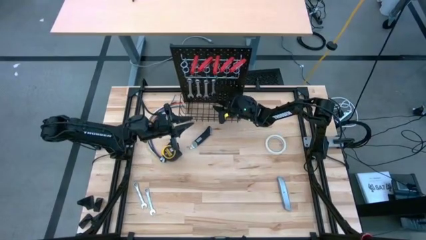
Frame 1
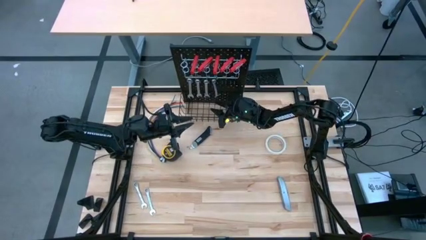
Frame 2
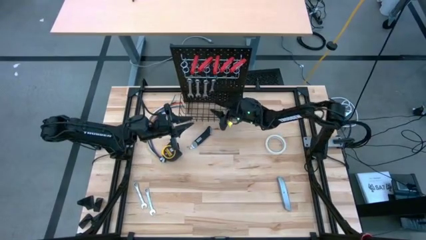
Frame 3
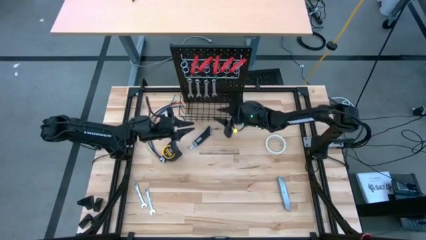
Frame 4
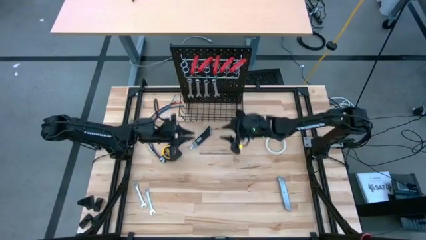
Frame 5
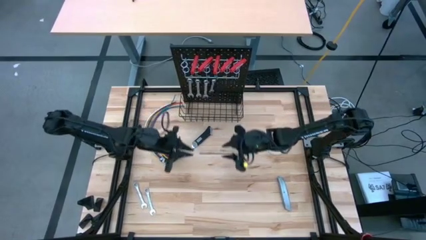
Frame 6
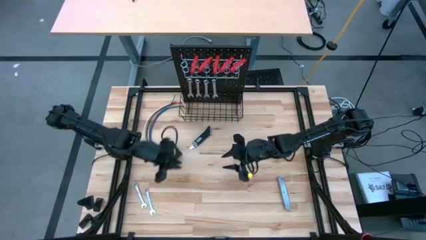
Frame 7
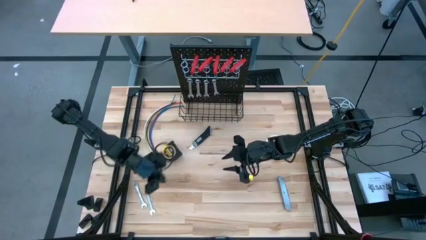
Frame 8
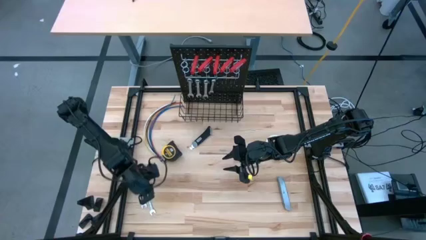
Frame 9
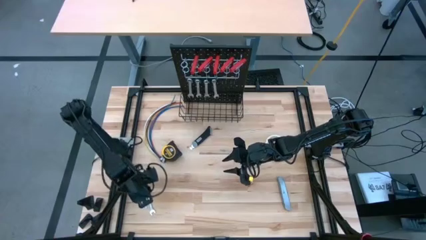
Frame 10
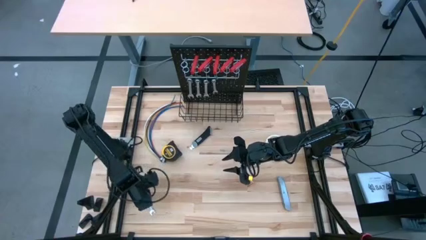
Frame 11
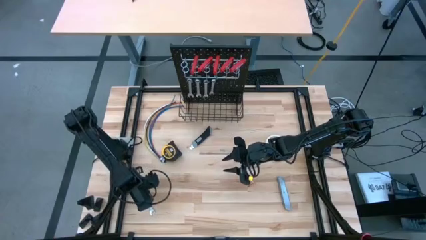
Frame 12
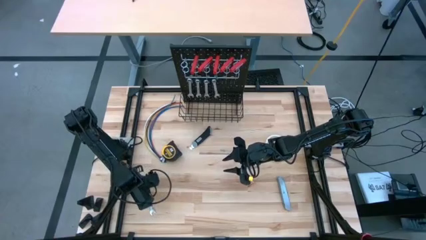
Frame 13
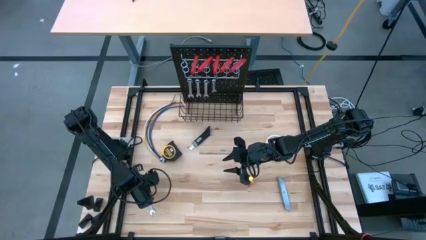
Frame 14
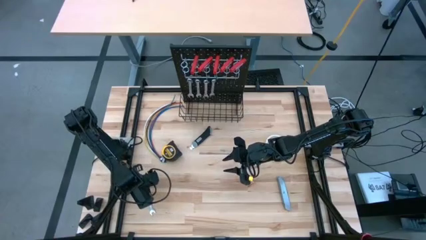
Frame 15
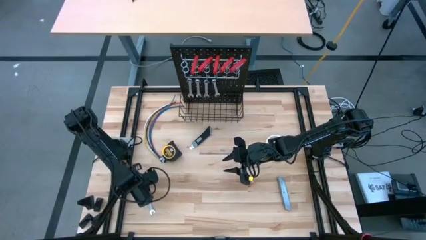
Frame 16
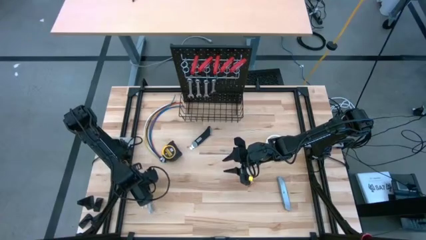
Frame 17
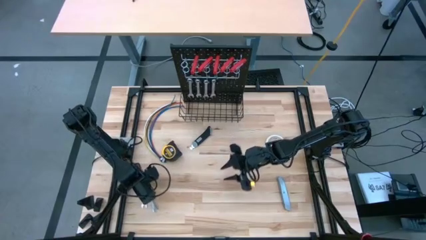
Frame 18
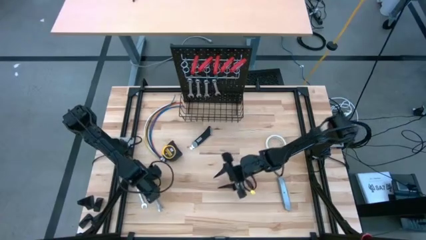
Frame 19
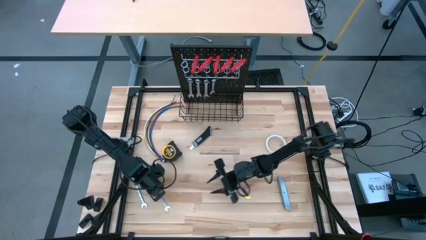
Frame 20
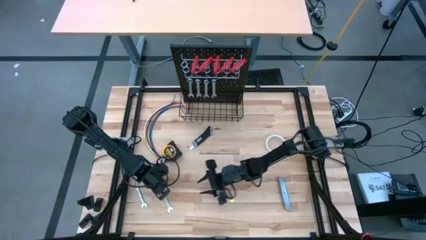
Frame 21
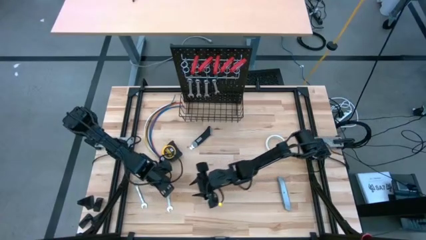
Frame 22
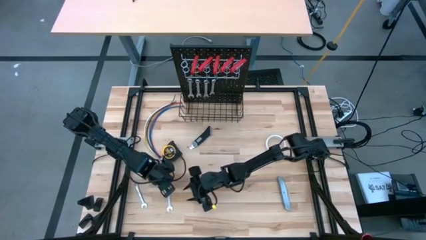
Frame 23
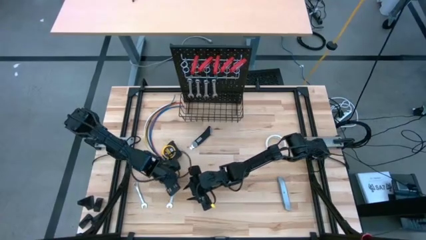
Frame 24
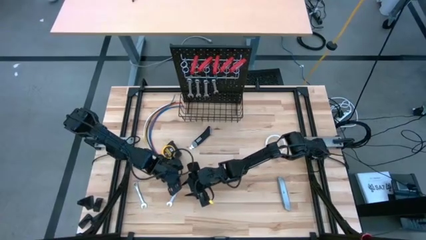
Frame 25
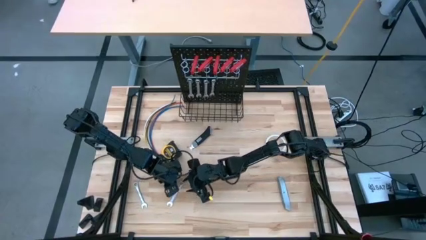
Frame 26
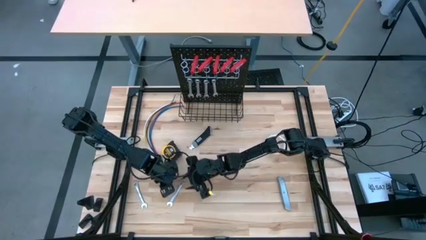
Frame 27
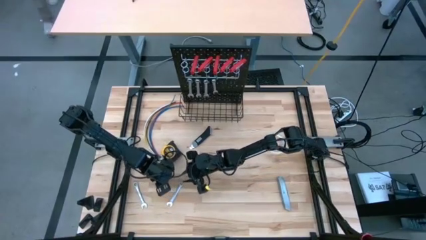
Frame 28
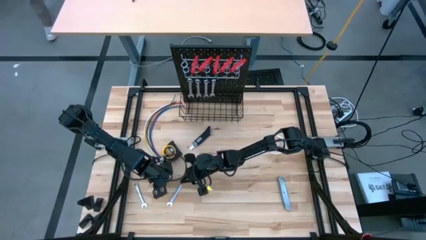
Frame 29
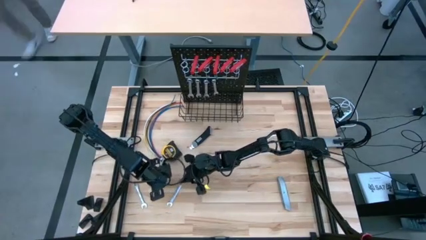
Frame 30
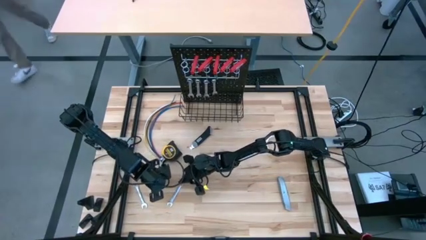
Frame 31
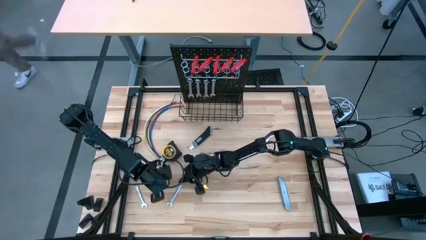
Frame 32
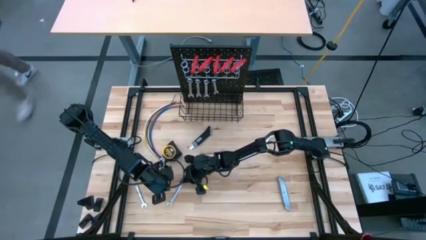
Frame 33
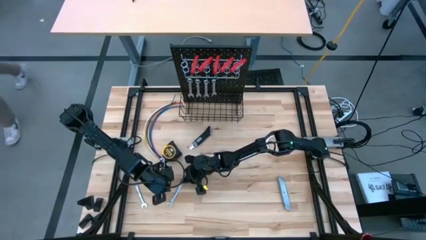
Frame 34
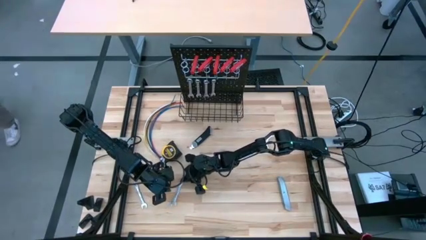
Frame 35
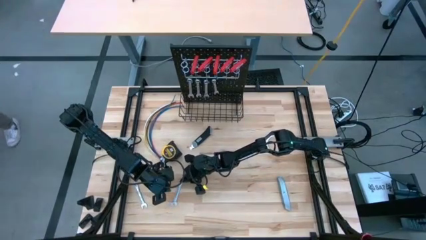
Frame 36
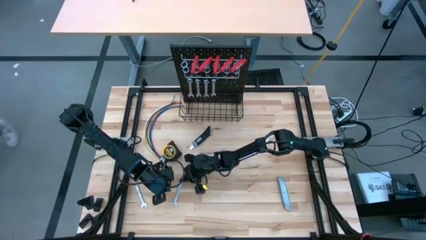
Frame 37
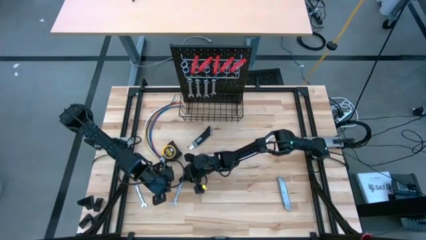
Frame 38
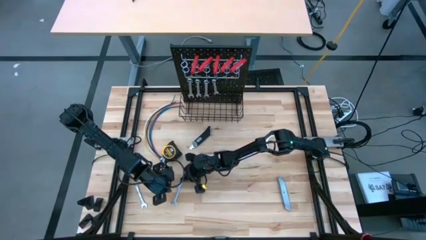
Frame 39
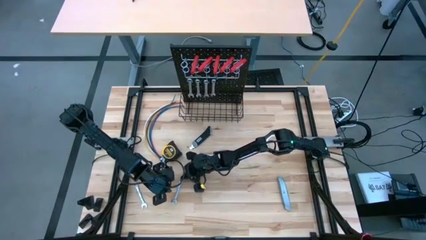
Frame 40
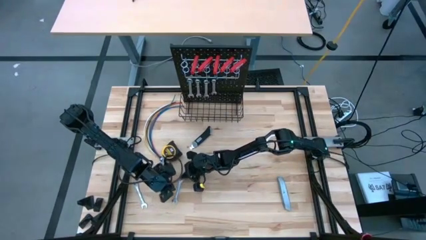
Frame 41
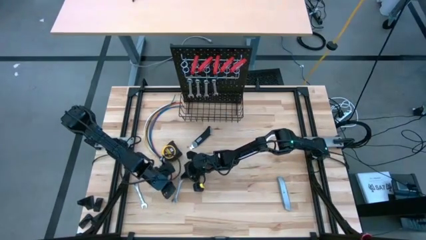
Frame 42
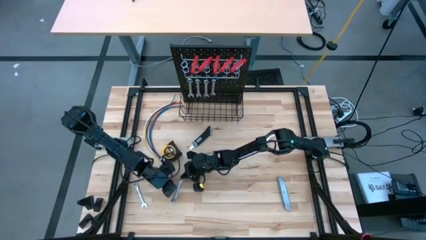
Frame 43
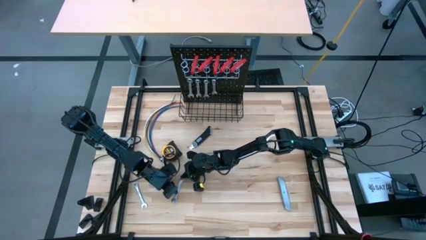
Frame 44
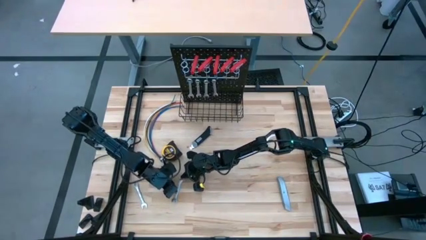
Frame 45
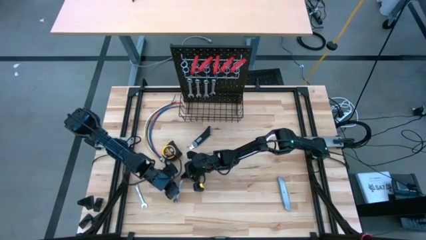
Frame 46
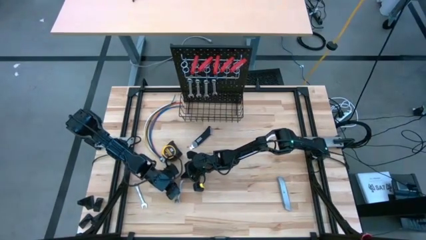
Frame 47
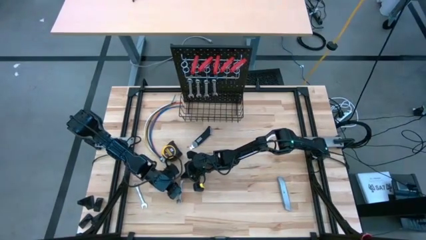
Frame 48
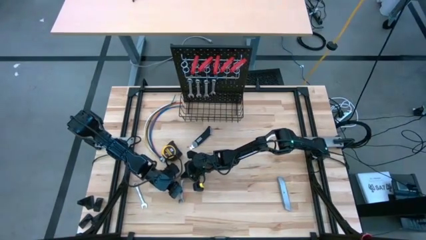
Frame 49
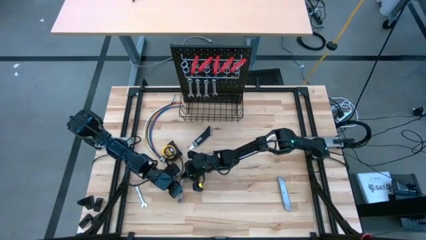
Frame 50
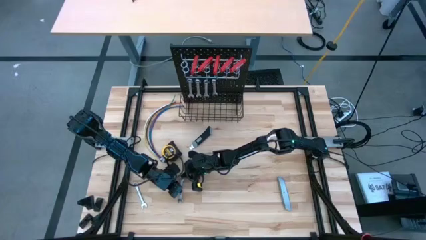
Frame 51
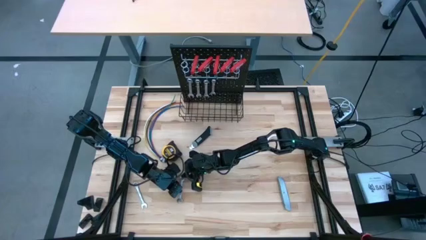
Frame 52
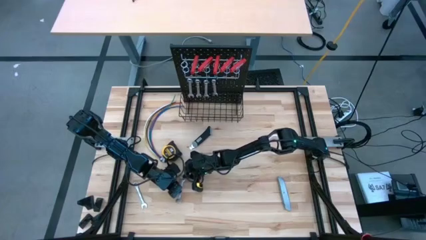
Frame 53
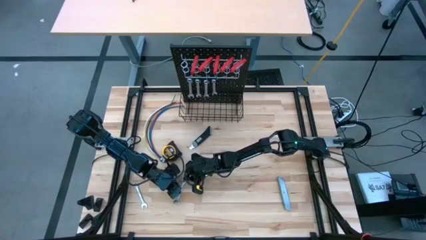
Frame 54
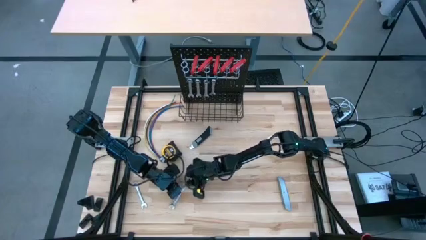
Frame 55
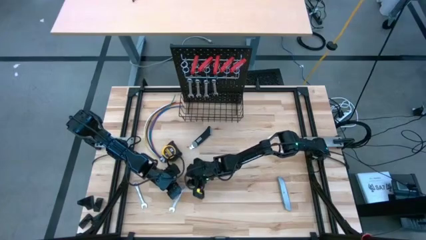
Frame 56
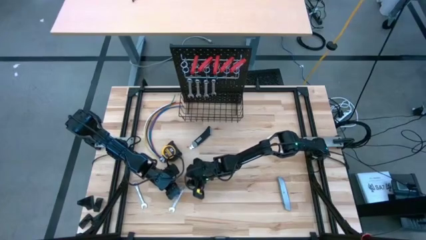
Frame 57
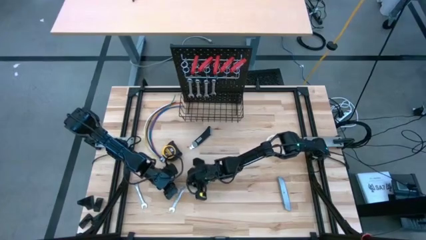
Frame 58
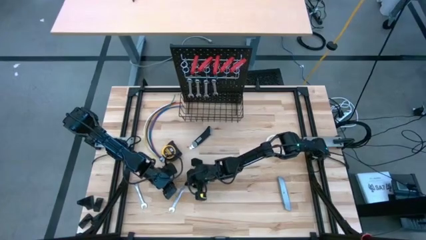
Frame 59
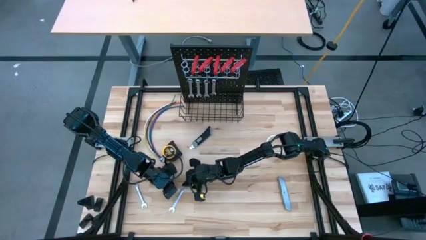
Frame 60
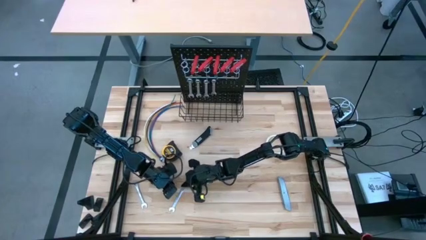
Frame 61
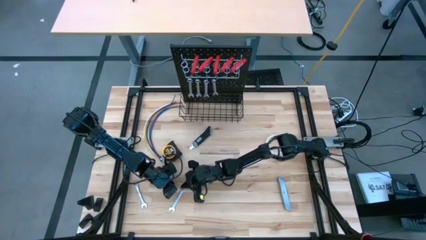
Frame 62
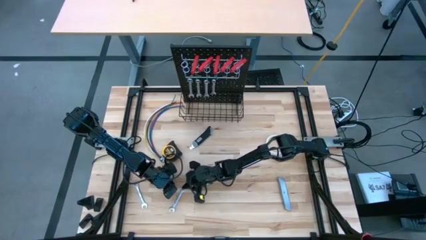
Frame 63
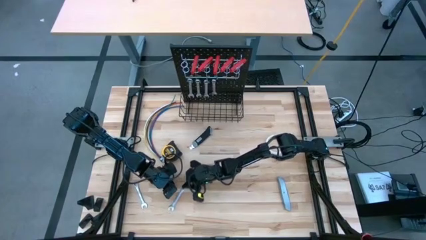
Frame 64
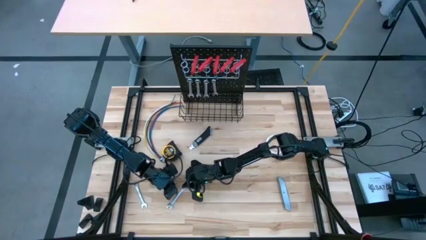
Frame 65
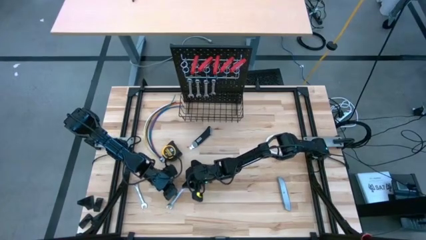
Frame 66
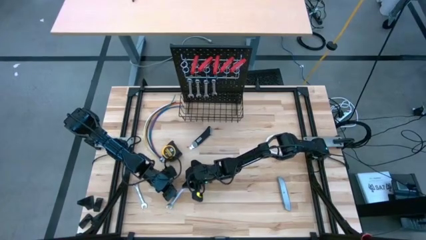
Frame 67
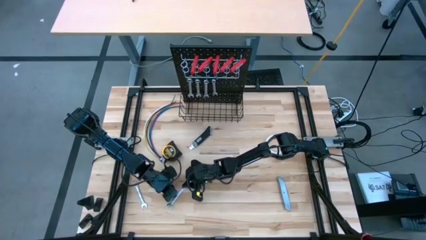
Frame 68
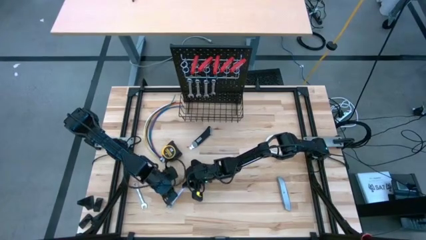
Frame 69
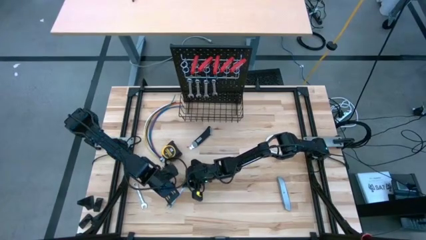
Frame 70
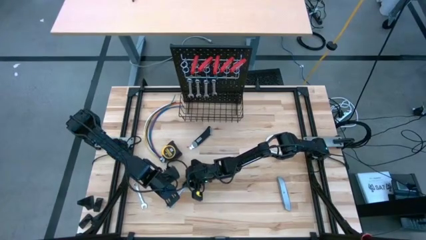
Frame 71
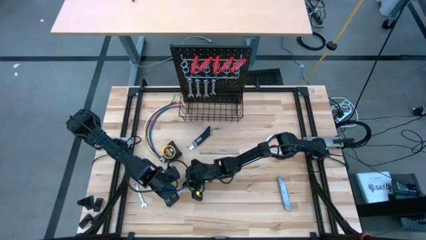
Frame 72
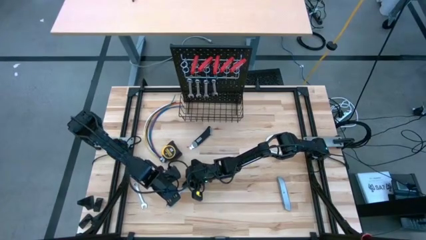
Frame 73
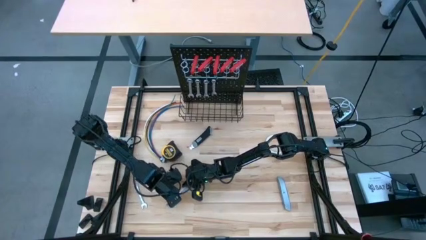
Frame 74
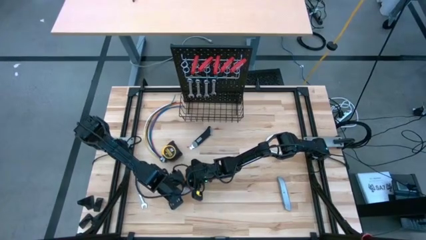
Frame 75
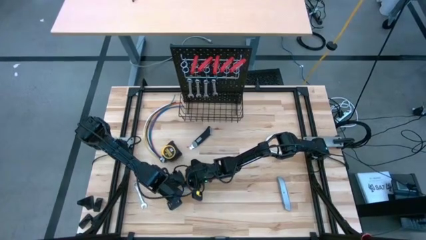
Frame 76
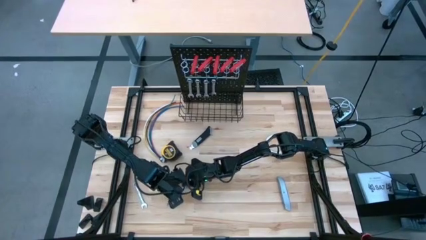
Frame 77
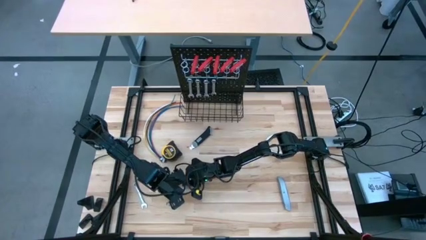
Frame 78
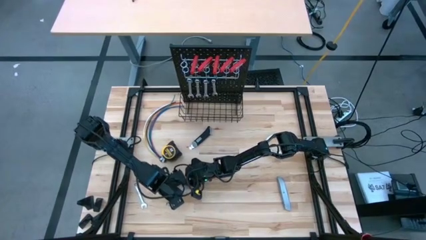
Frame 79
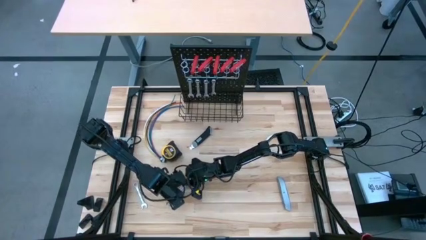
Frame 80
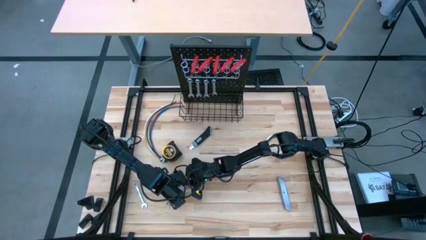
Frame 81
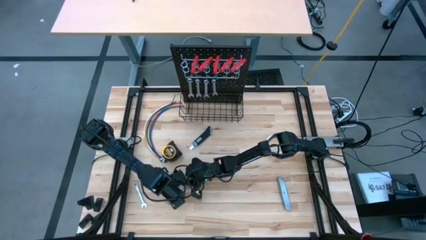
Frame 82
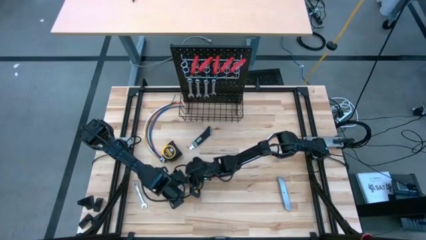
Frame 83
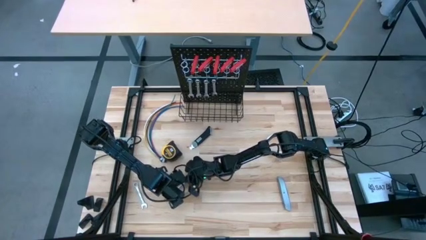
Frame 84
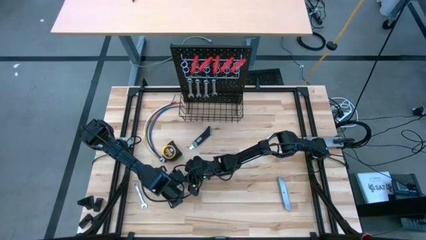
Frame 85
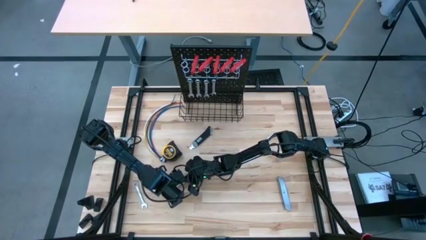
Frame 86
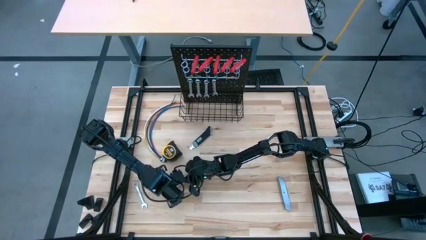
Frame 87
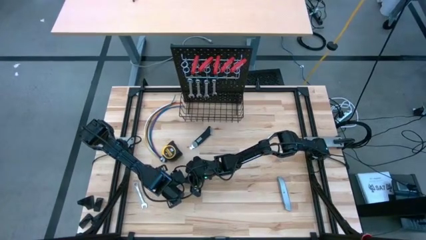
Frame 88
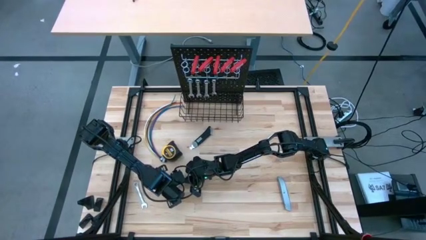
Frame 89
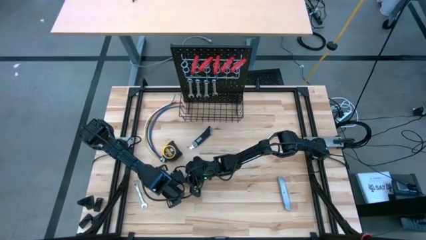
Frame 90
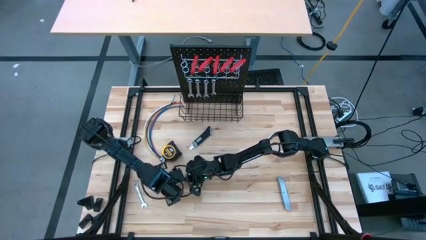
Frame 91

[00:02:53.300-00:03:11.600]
Task: Hang tools onto peg board
Hang the right wrench on the peg board
